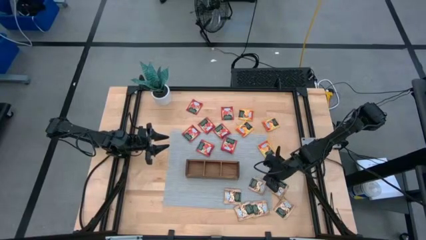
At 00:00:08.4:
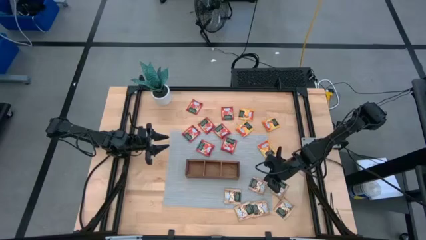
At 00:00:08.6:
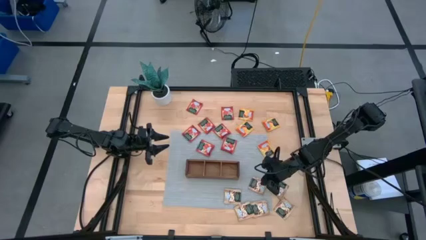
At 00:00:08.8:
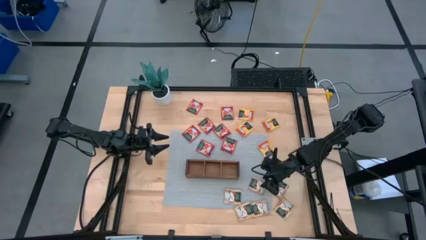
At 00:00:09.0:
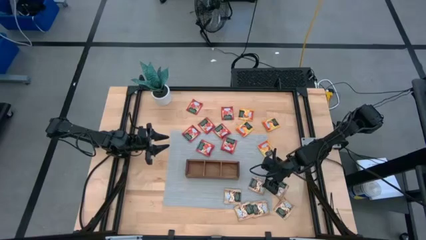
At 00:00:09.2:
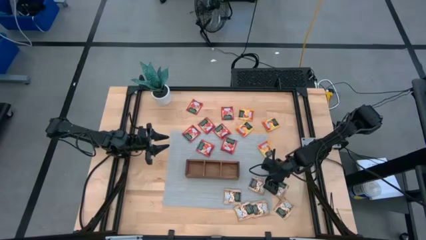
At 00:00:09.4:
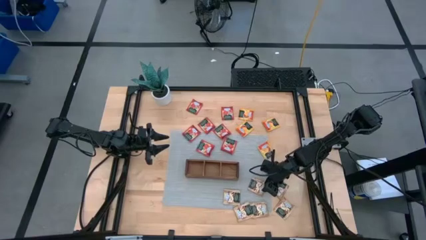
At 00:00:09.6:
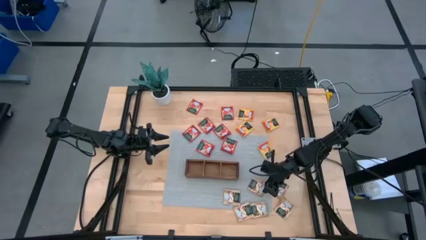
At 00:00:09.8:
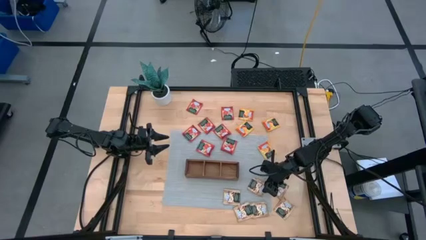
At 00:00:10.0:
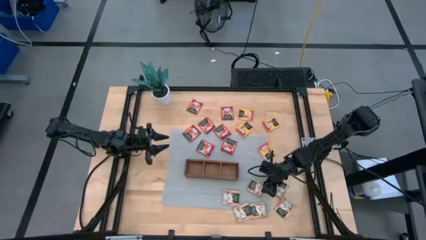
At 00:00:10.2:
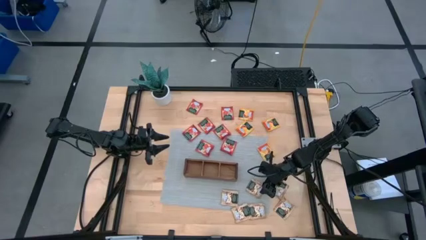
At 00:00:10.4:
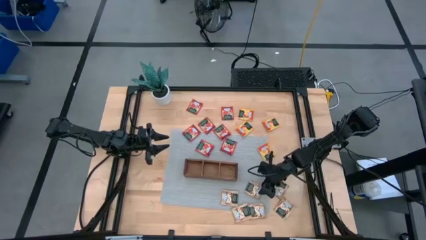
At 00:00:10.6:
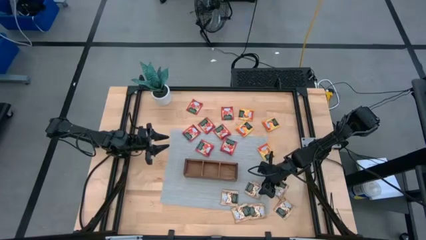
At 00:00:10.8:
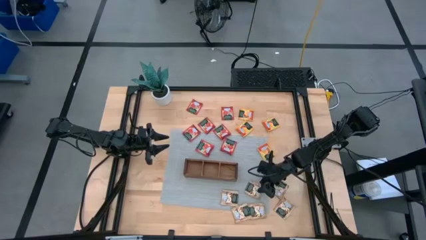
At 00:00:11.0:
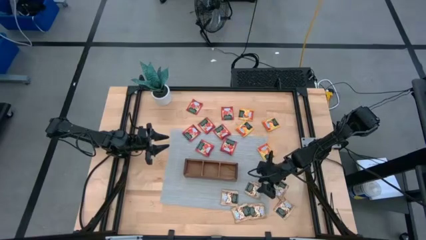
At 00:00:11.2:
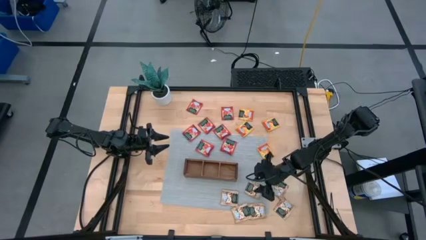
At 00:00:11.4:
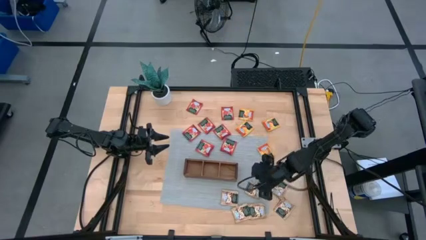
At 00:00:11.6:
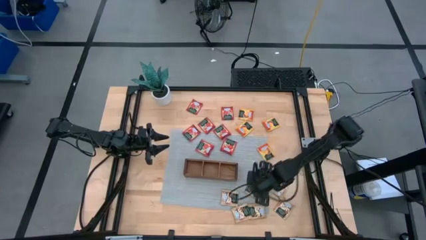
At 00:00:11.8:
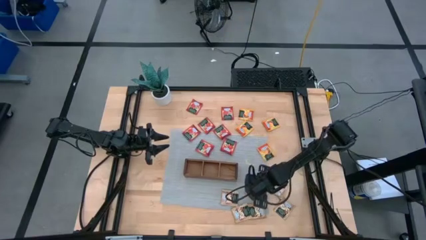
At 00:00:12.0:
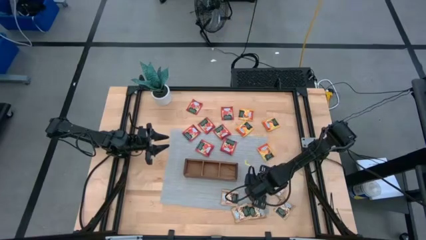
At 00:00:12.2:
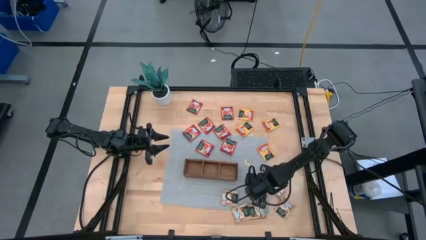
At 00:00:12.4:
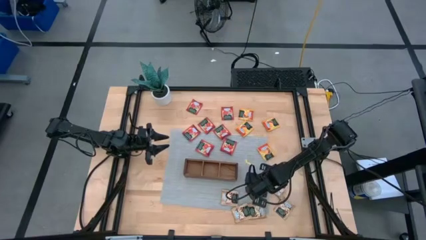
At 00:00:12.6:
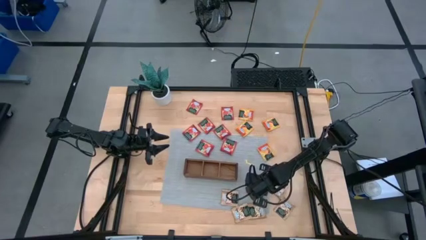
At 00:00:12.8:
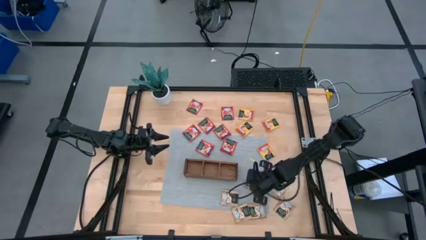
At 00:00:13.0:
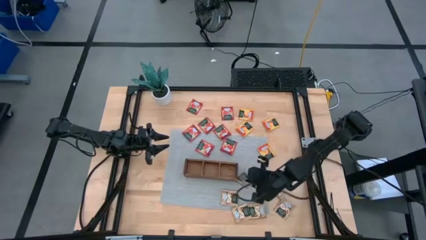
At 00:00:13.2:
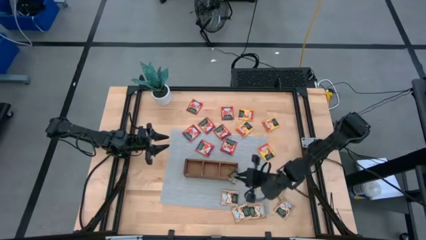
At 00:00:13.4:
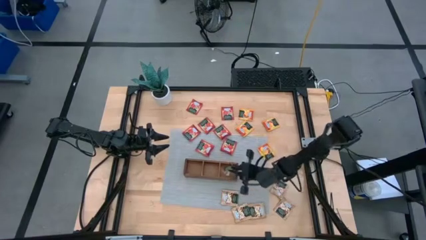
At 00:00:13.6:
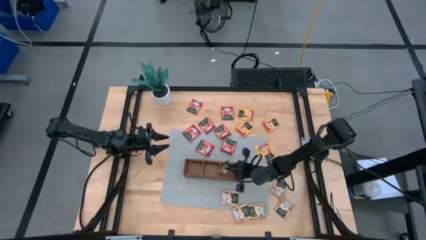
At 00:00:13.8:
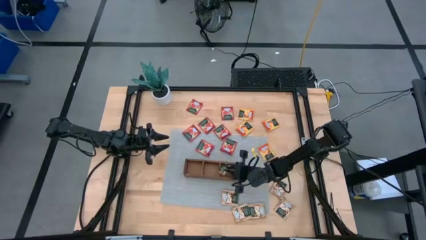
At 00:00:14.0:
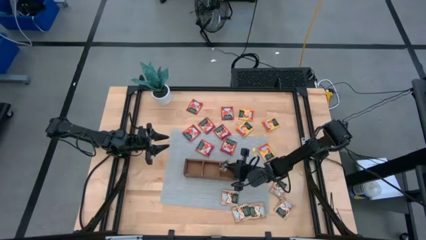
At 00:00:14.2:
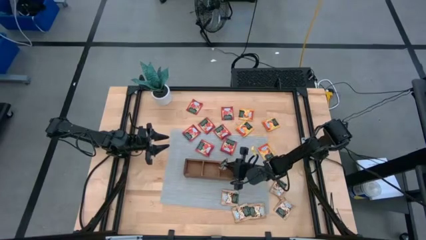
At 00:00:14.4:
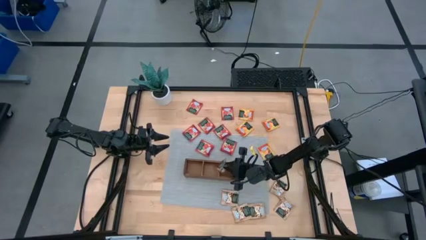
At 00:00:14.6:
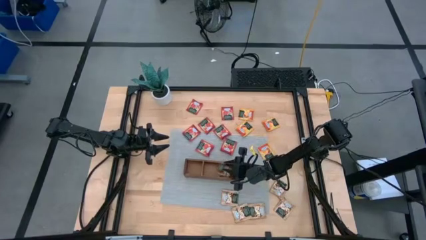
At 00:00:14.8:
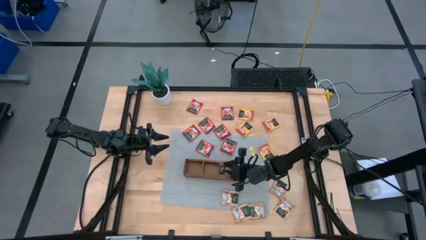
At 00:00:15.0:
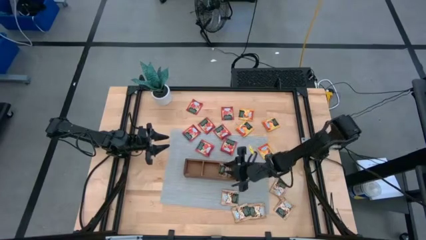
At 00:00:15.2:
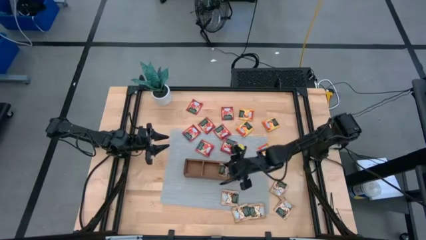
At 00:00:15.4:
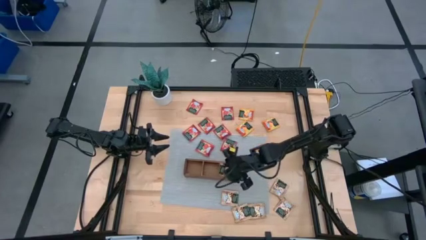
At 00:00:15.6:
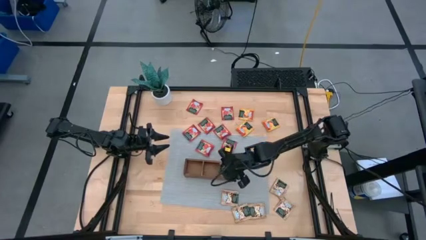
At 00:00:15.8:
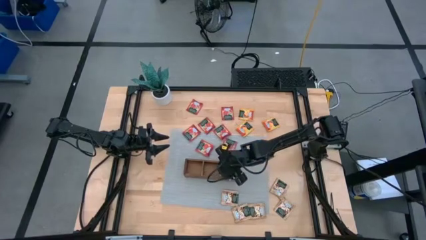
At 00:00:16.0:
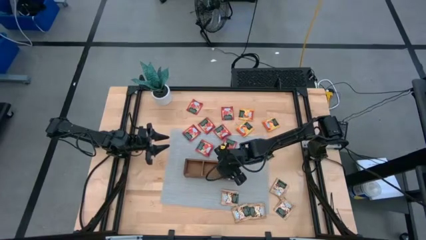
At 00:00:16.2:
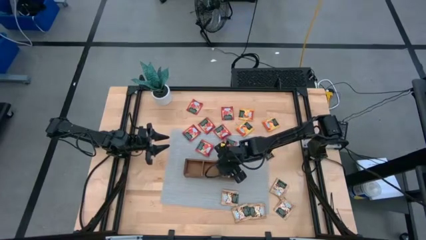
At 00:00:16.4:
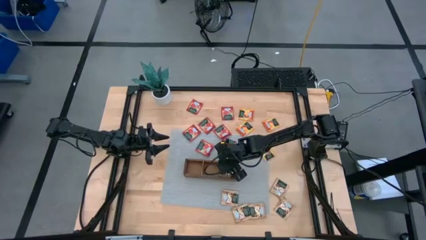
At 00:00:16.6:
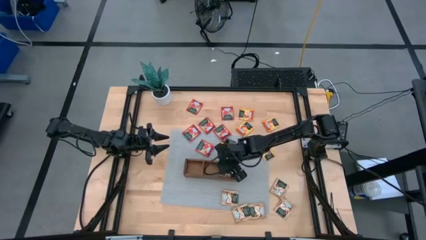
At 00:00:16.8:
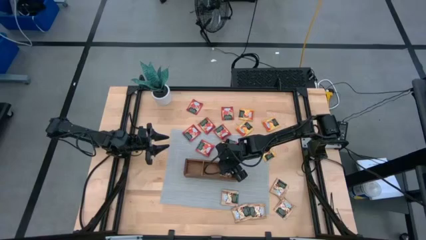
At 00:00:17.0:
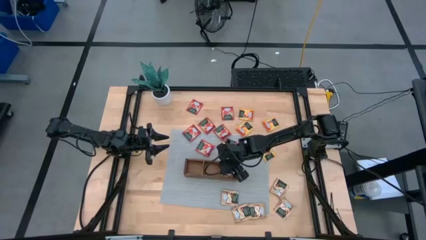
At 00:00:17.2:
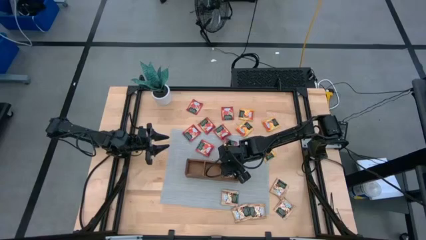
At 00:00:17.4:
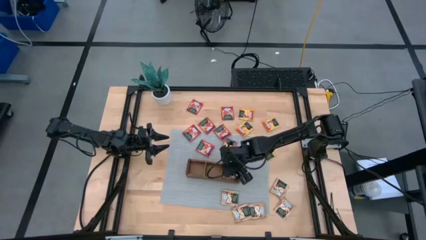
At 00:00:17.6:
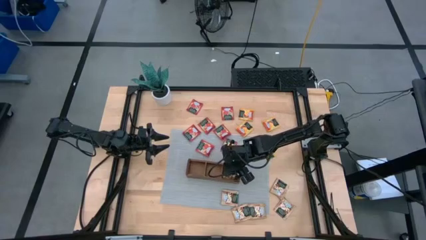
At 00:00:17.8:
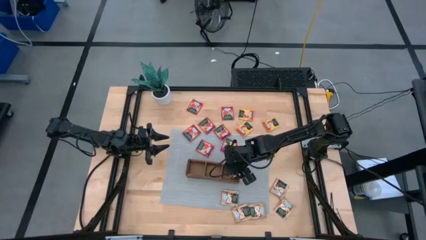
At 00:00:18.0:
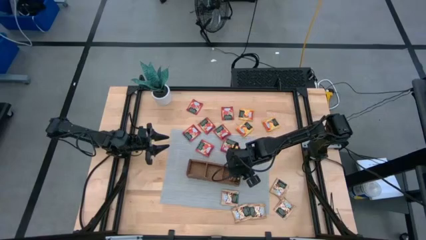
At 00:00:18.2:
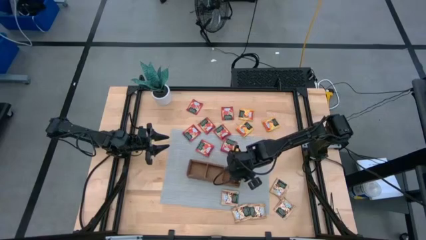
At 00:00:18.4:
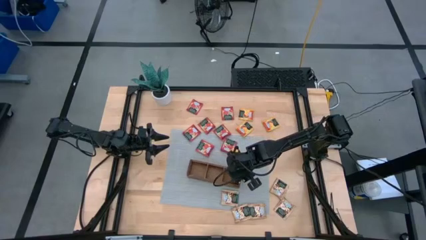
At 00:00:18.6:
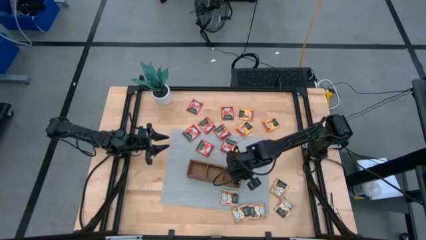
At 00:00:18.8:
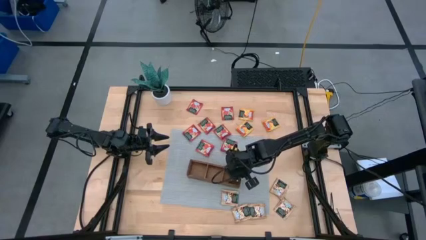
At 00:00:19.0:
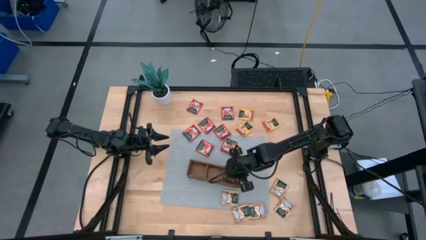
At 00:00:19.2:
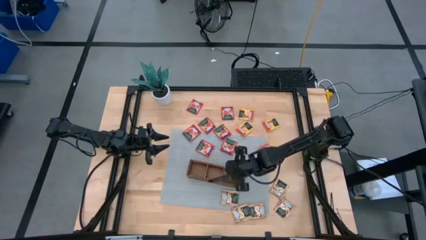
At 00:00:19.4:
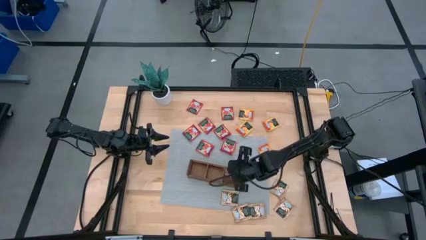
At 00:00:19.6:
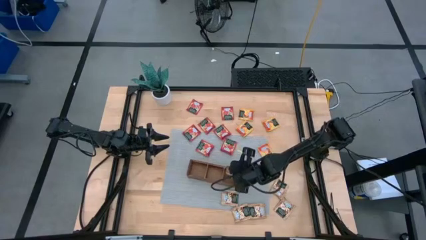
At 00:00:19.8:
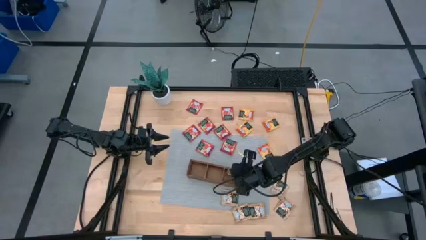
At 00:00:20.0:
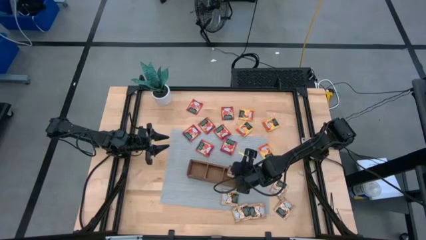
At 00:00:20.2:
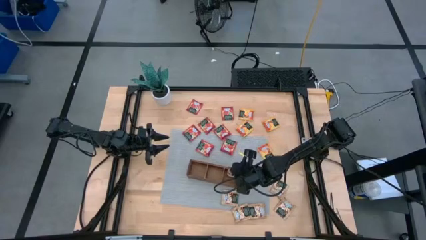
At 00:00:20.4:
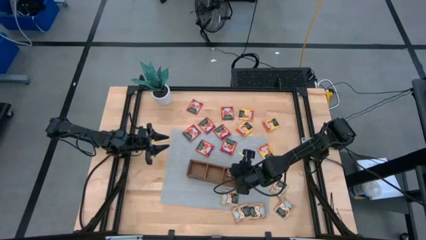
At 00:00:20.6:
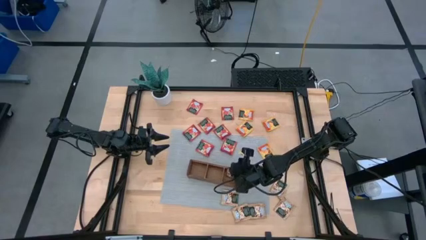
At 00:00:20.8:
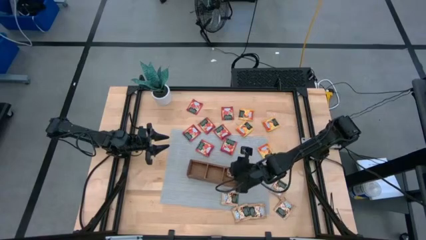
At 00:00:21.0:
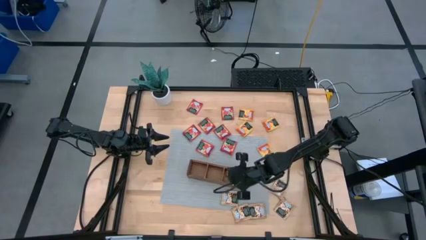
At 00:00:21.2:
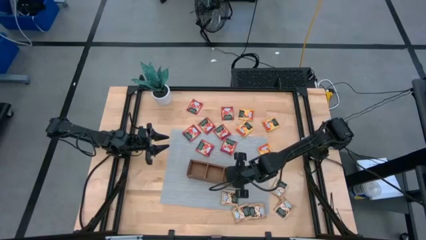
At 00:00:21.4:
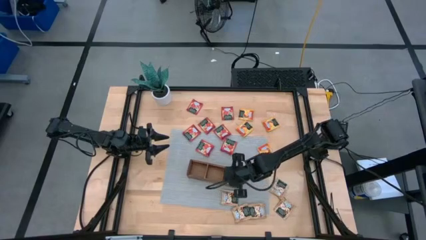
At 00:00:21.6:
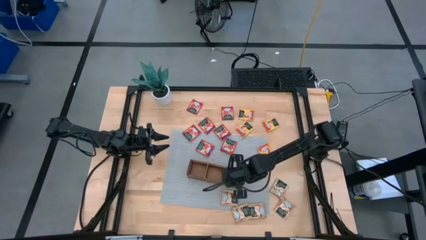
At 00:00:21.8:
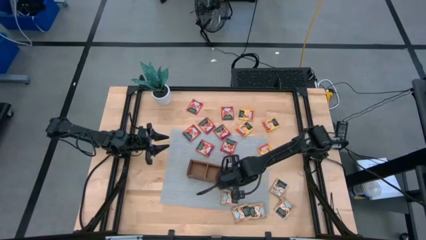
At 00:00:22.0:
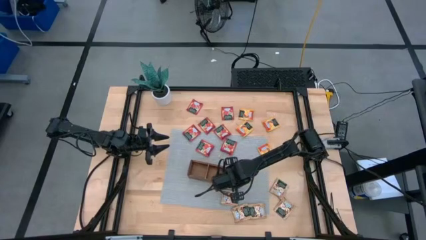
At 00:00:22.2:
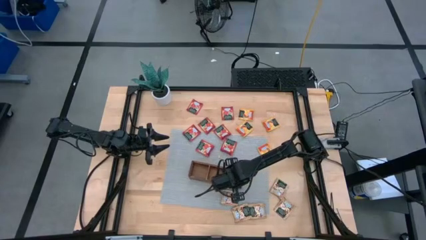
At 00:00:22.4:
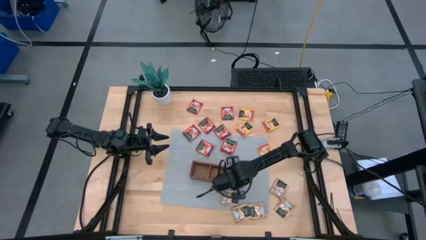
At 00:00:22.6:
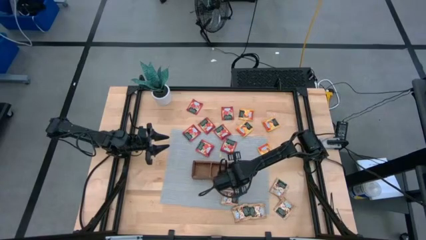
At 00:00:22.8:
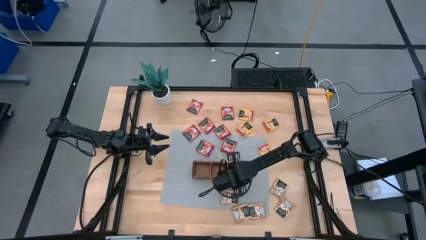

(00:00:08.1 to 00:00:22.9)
Task: Pick & Place Tea
Put the brown tea bag into the right compartment of the wood organizer
